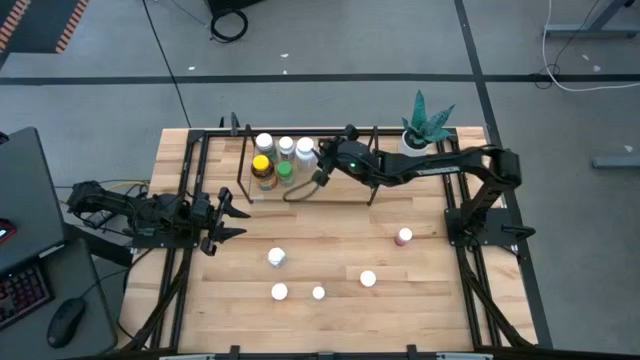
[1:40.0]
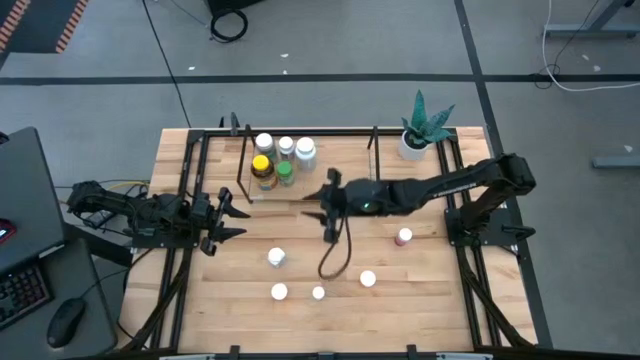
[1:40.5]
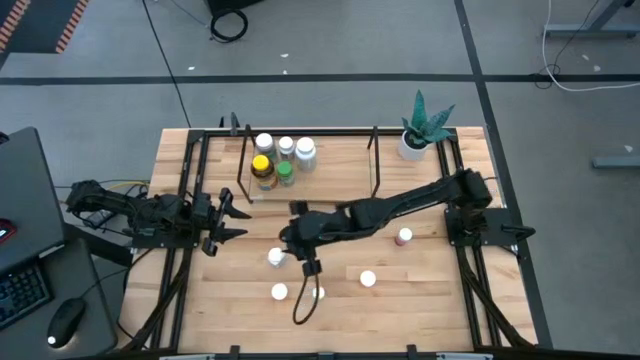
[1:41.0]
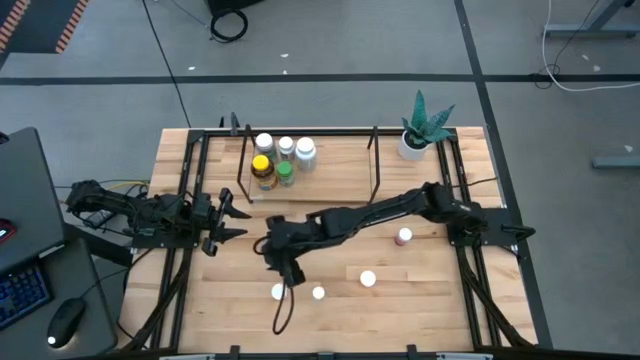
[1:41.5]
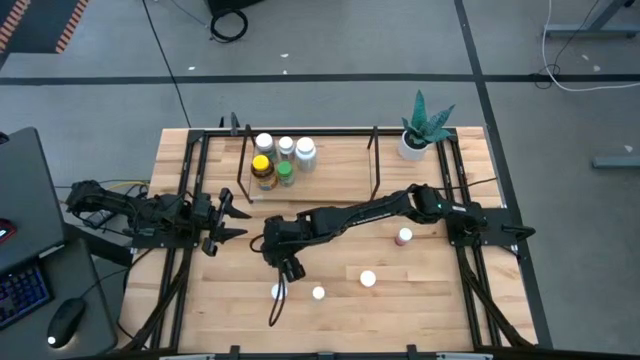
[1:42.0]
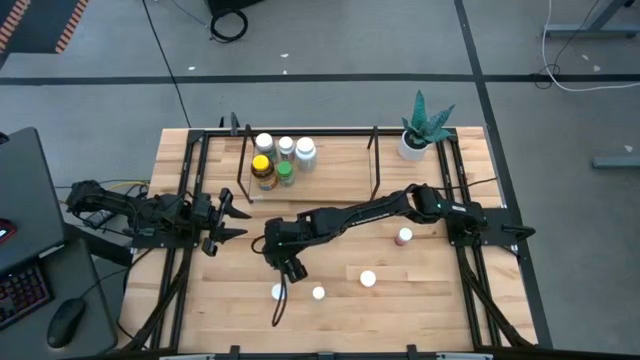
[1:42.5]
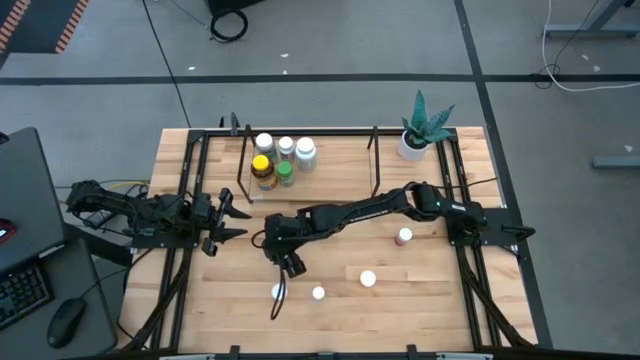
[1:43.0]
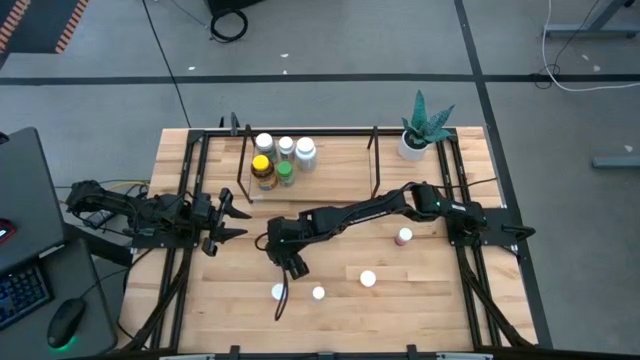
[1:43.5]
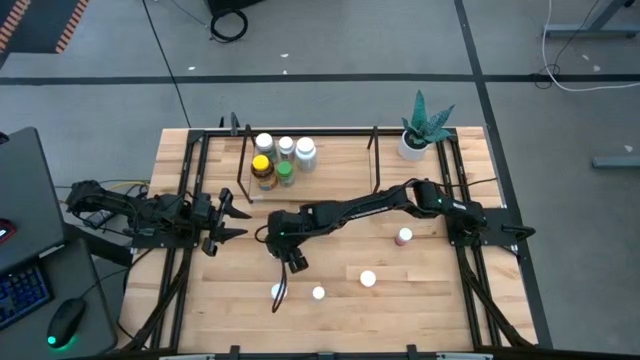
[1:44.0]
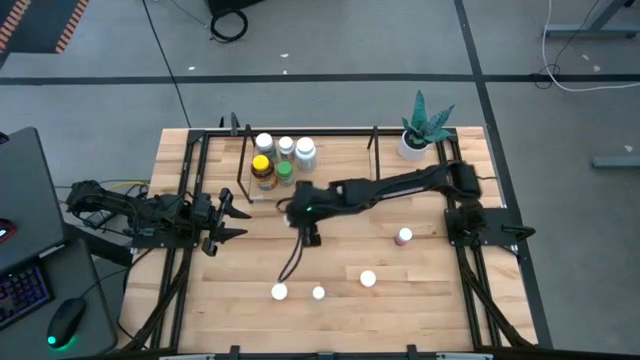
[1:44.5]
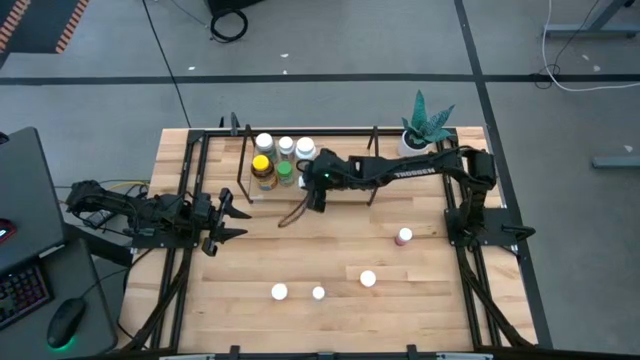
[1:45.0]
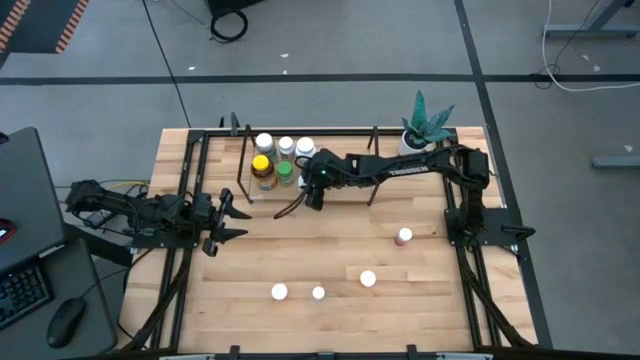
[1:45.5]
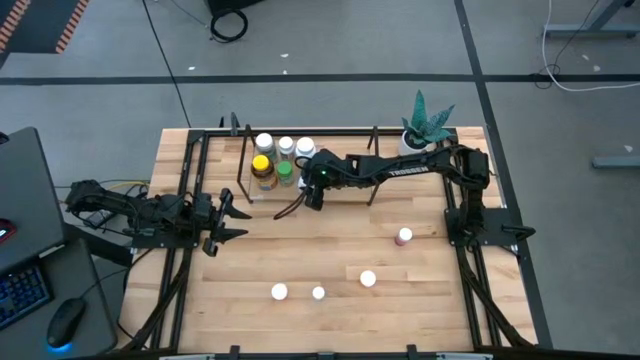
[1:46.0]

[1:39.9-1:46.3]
Task: Pick and place medicine bottles onto shelf by color
Put the blue pill bottle on the shelf aligned with the other red pill bottles

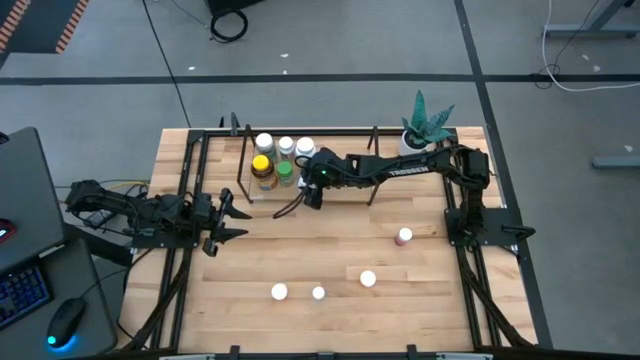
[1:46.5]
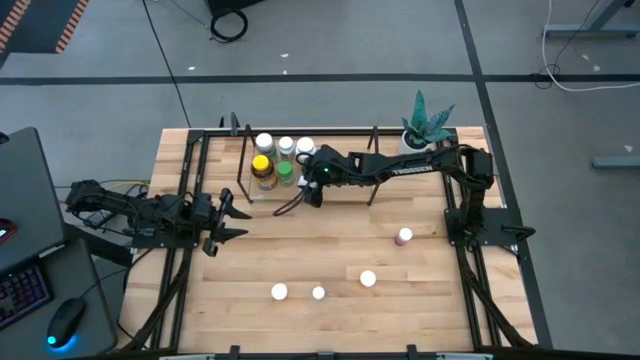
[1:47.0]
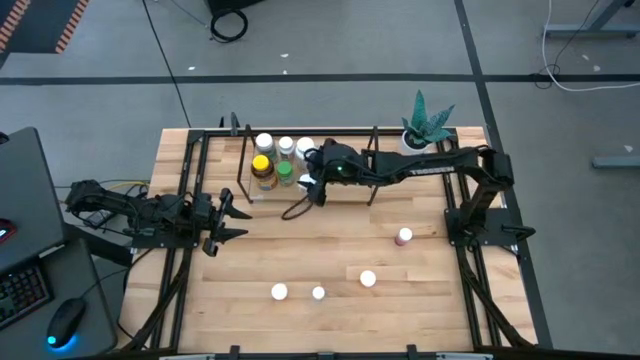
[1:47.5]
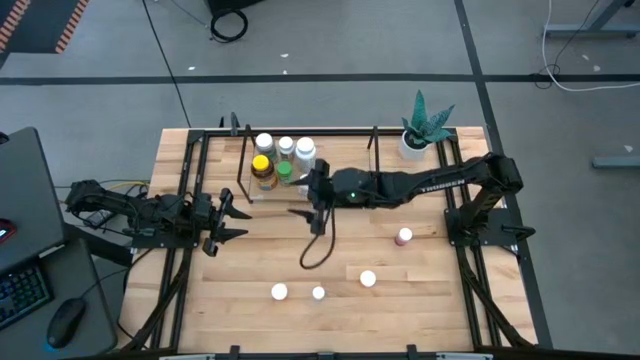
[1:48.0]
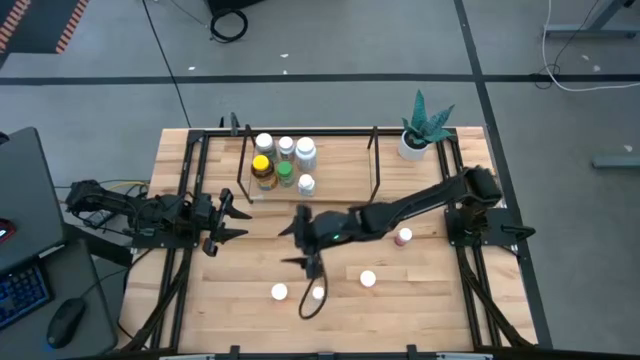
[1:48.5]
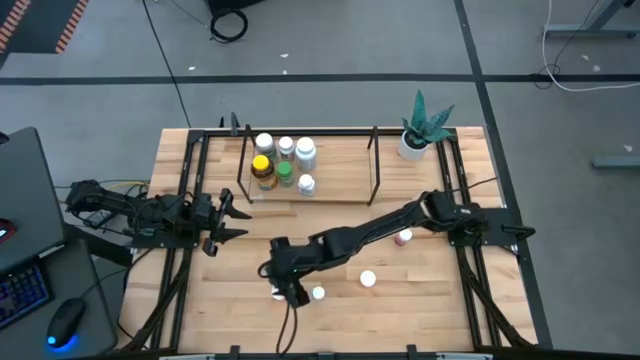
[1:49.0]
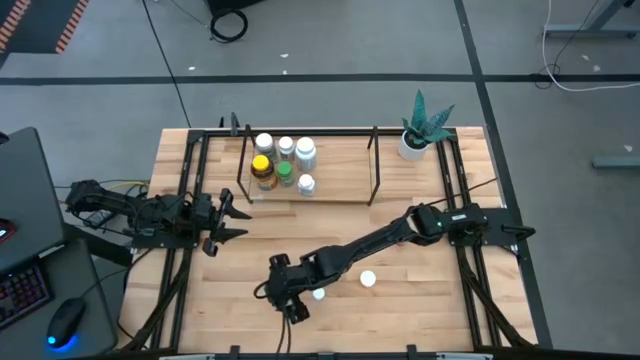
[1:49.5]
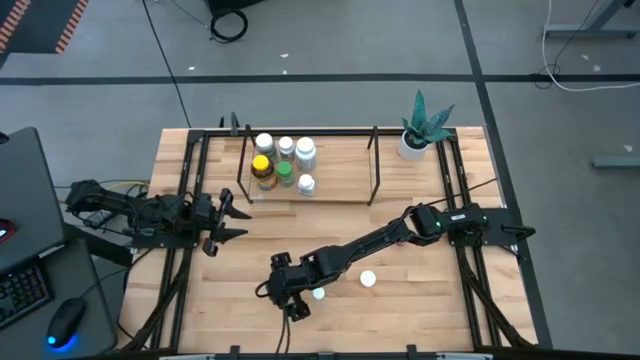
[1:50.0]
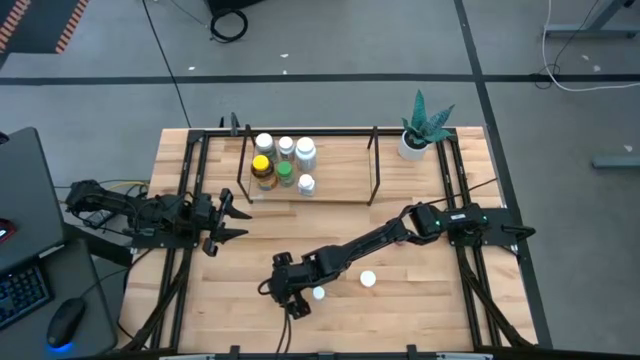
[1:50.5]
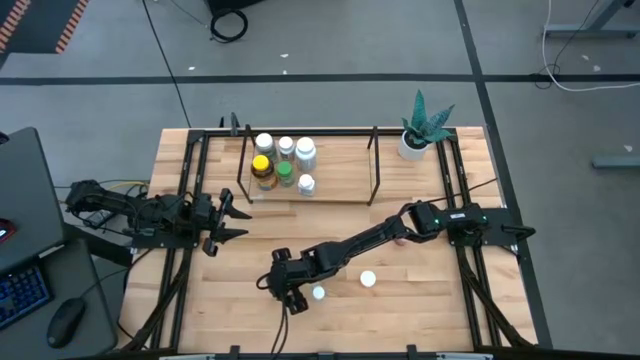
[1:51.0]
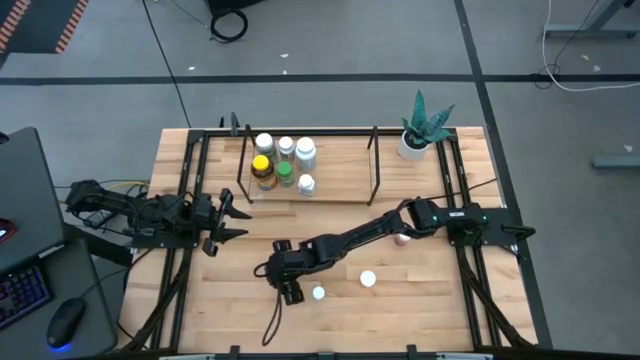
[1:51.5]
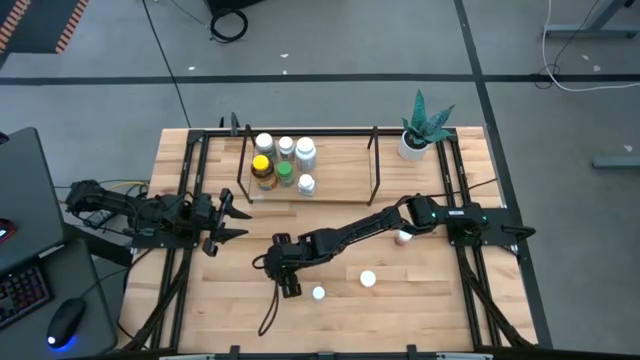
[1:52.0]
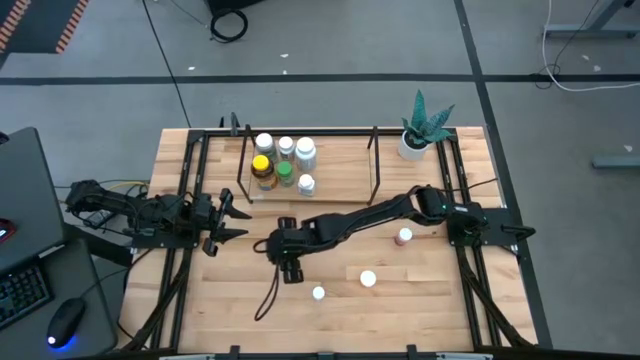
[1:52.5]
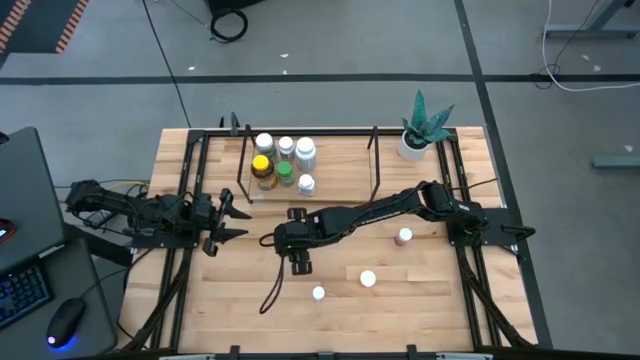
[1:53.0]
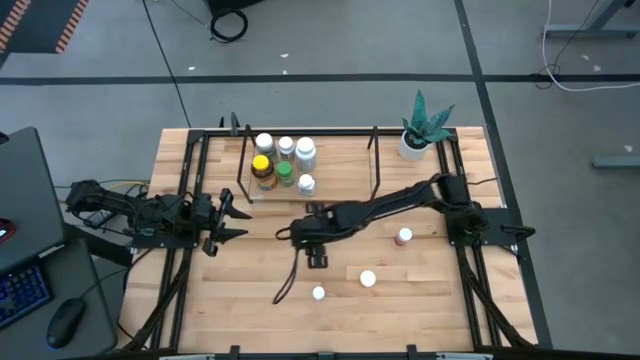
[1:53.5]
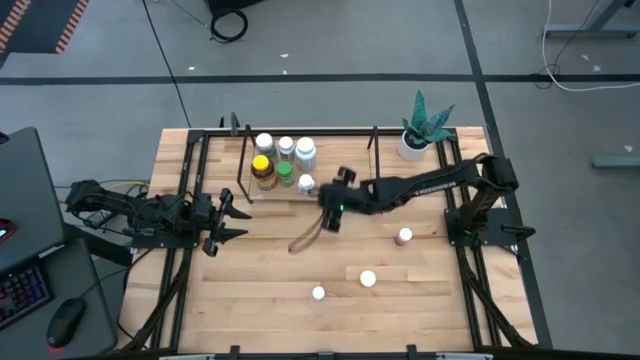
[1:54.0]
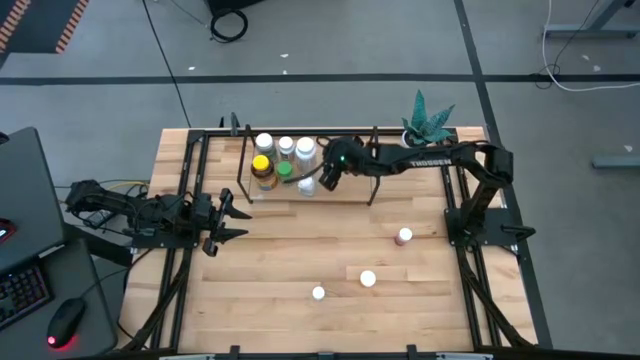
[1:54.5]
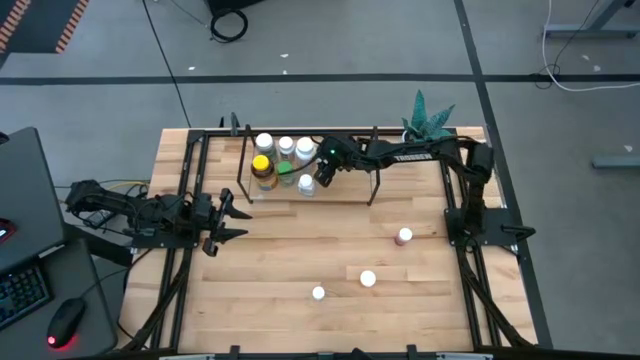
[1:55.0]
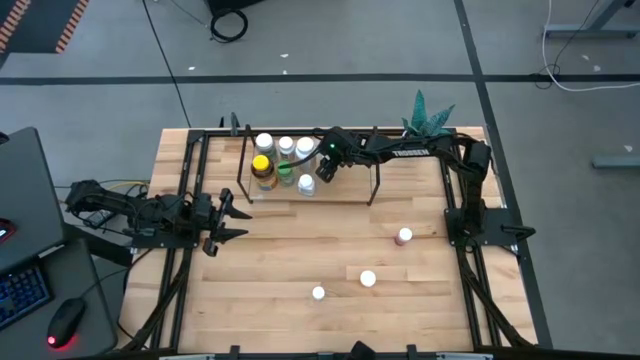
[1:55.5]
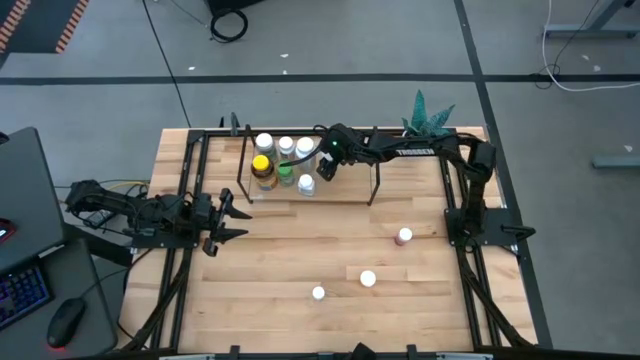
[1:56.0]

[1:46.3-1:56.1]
Put the left yellow pill bottle on the shelf

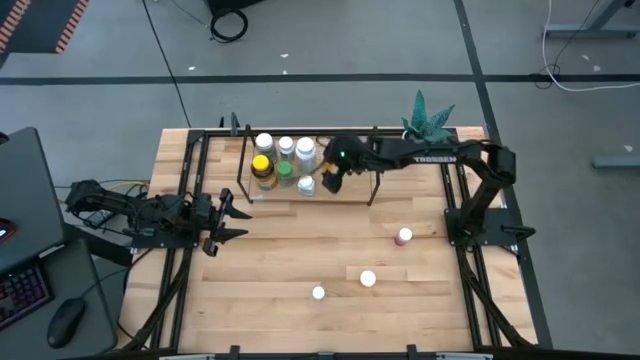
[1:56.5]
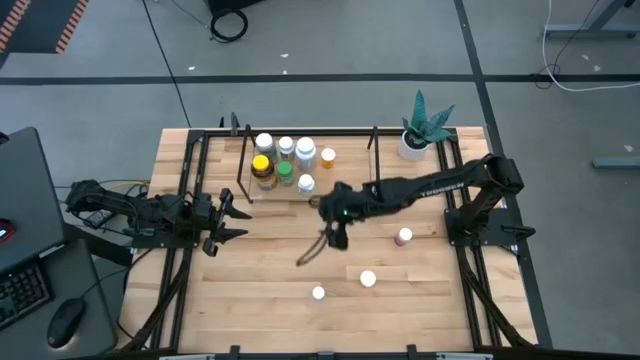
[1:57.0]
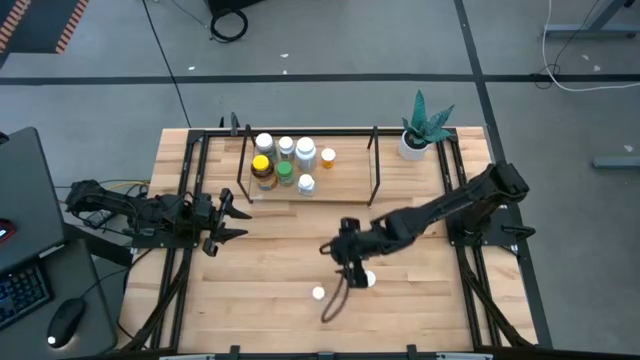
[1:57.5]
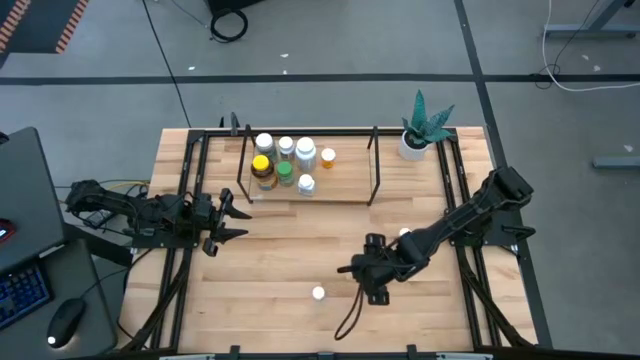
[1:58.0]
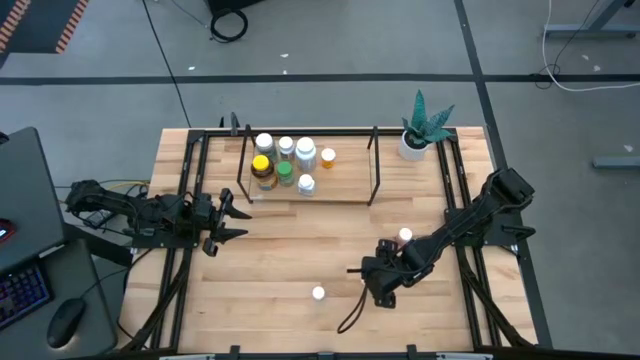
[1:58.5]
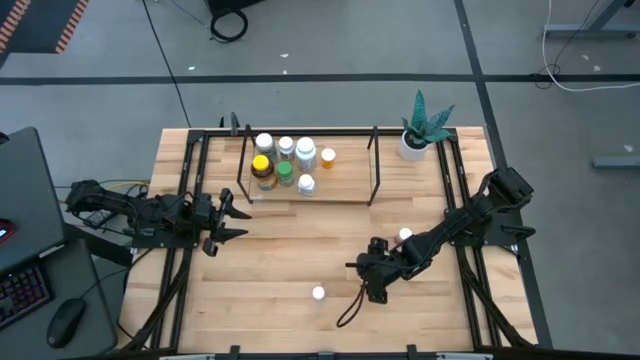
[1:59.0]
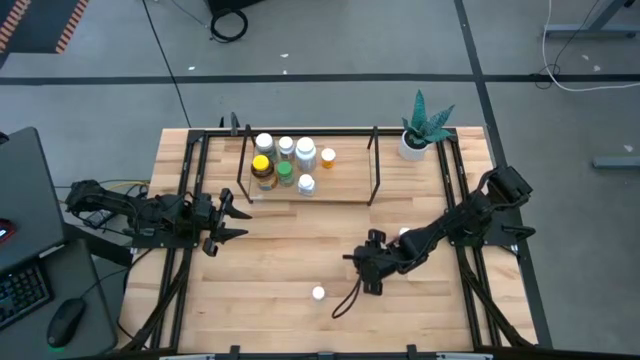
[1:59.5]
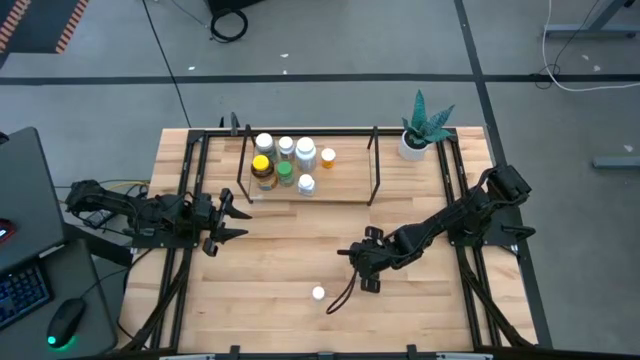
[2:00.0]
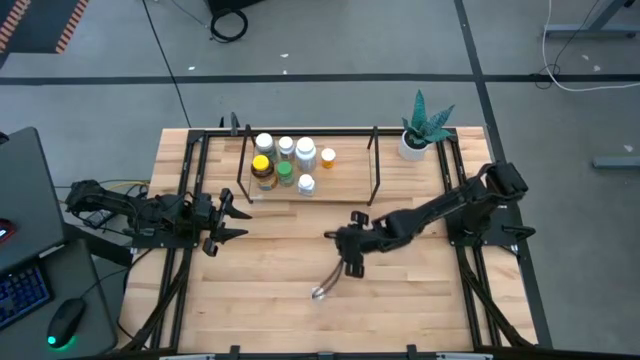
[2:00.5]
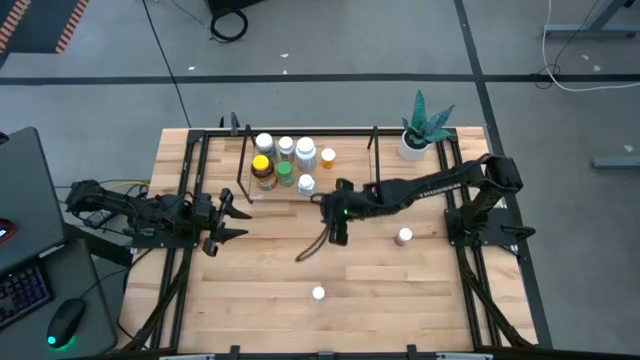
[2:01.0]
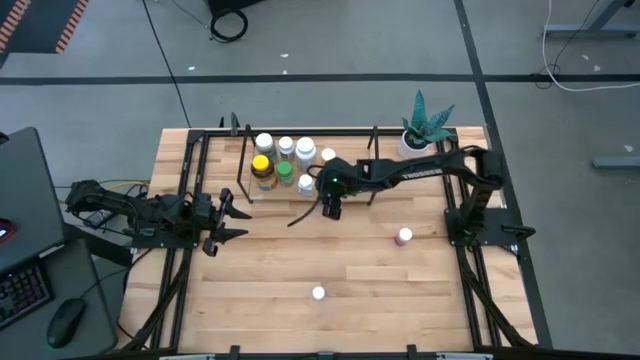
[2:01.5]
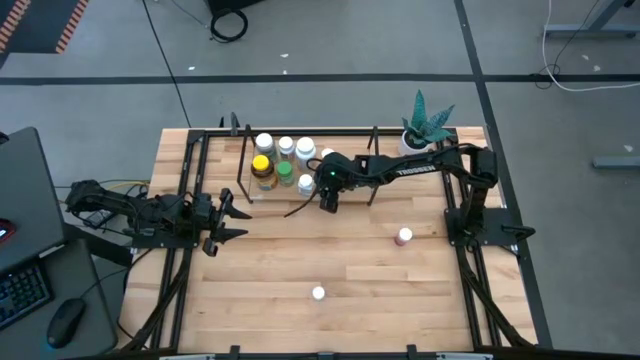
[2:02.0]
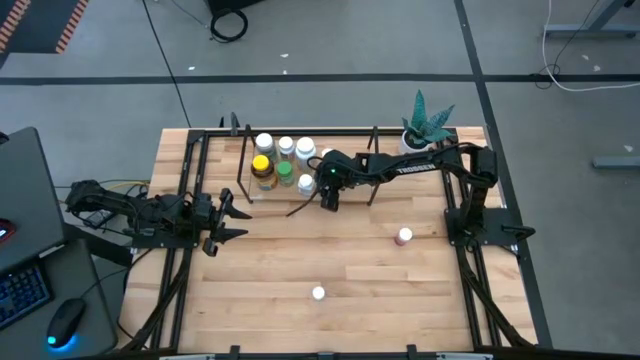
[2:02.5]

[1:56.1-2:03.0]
Put the yellow pill bottle on the shelf aligned with the other yellow pill bottles
